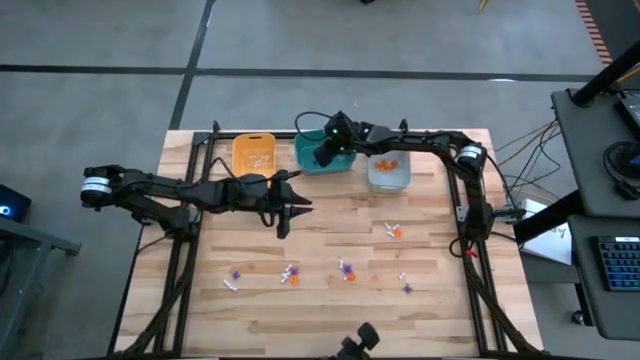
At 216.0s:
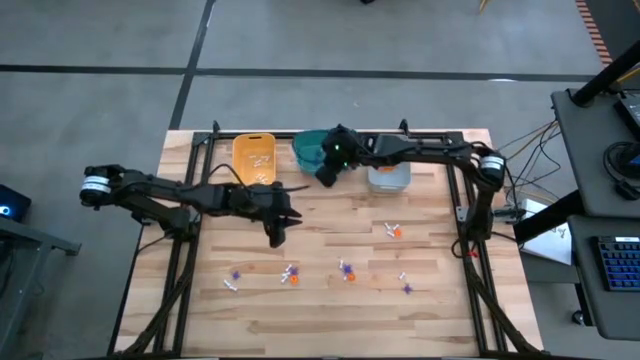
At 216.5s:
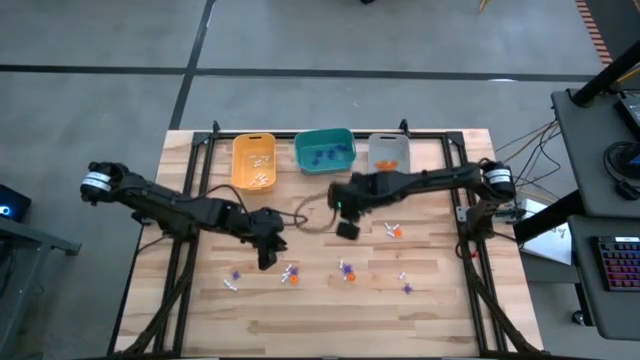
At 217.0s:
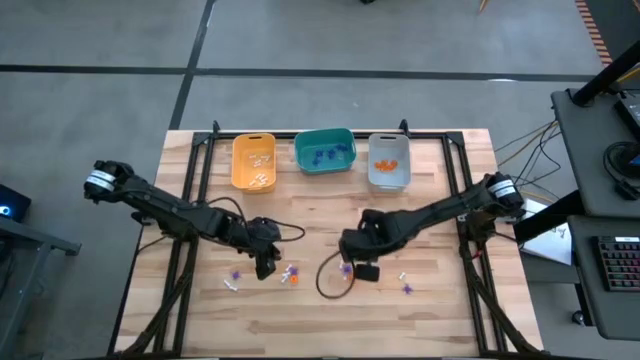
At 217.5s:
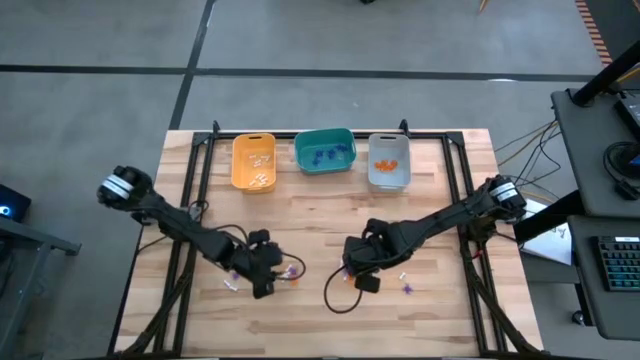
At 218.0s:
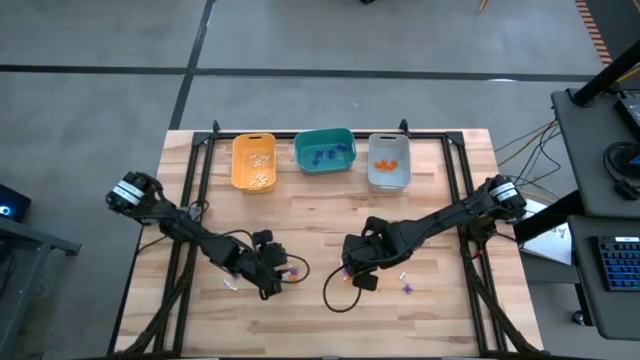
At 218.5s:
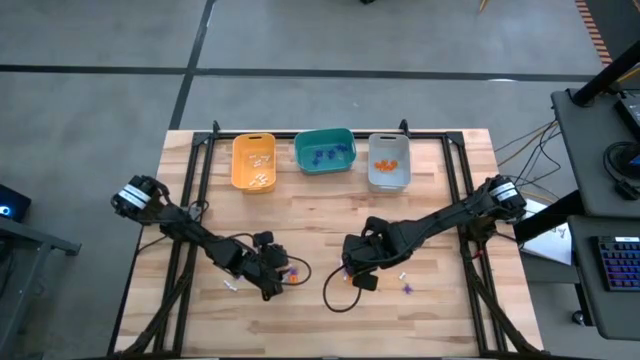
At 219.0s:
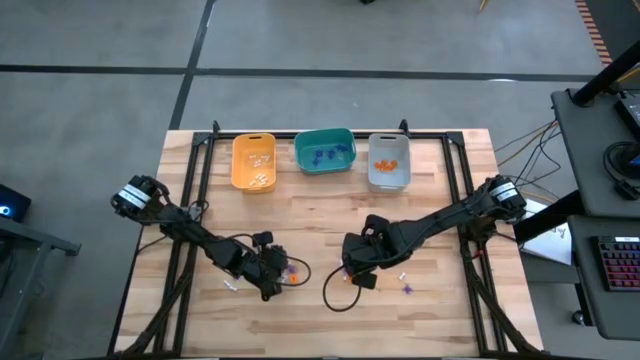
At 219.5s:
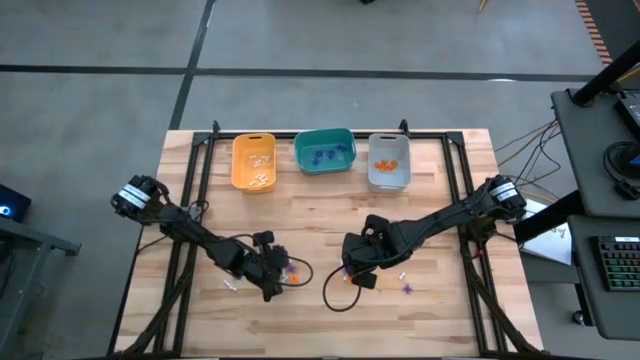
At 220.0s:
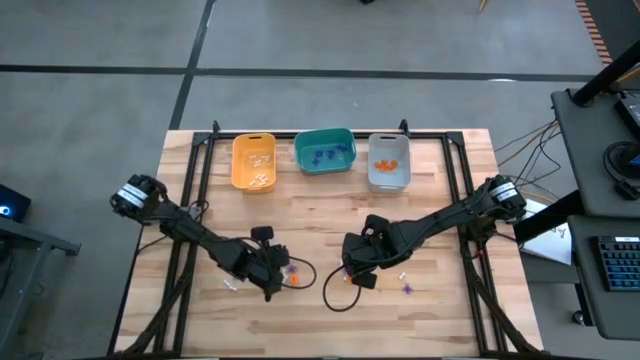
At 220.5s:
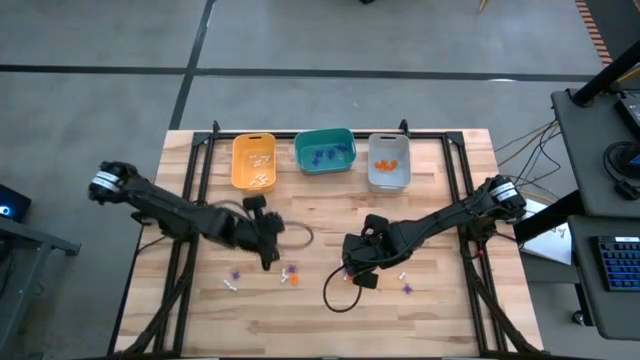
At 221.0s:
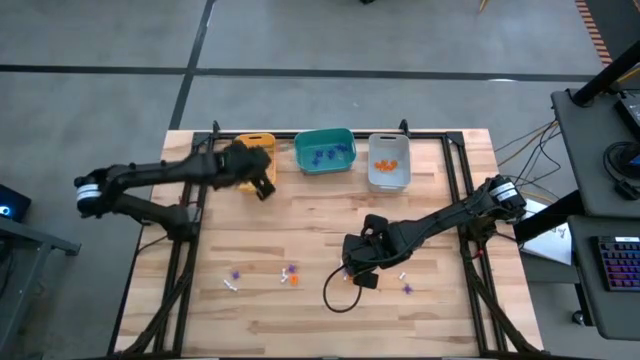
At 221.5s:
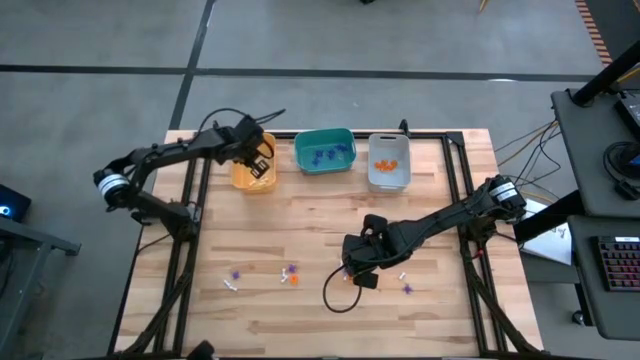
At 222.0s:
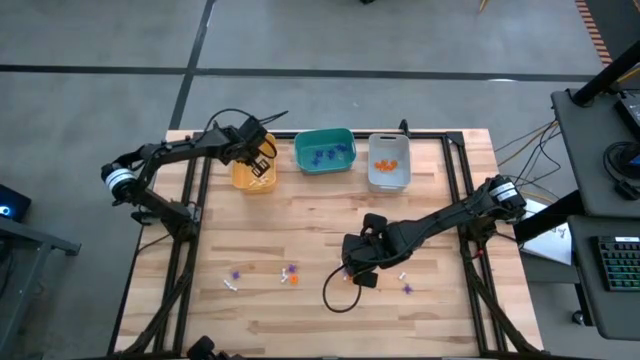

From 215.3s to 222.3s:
Task: Sort Halloween decoration
Put the white bone toy into the yellow bin

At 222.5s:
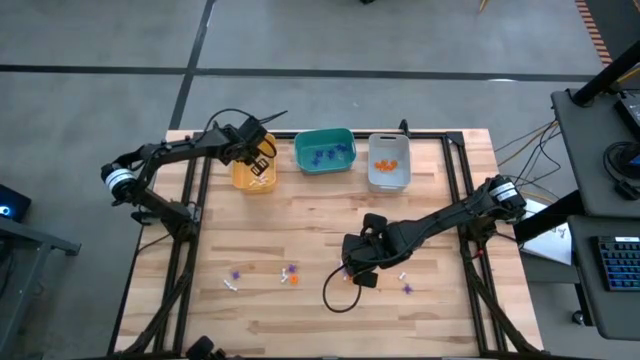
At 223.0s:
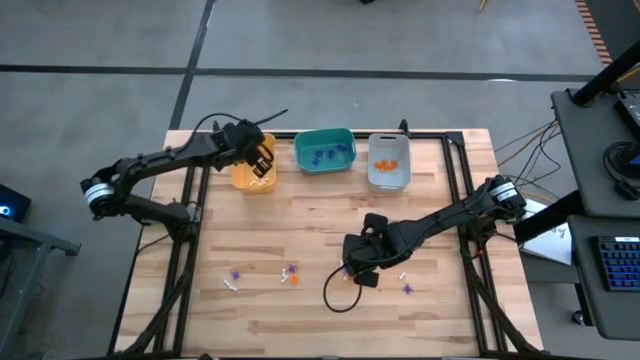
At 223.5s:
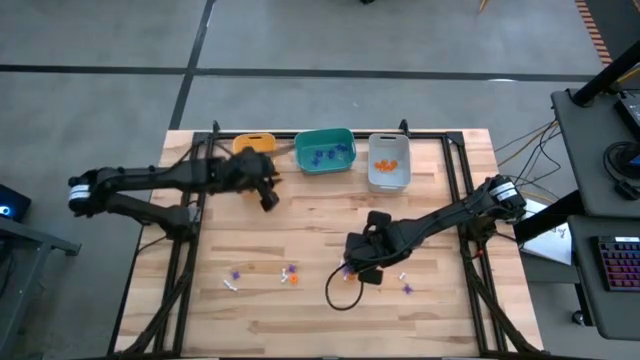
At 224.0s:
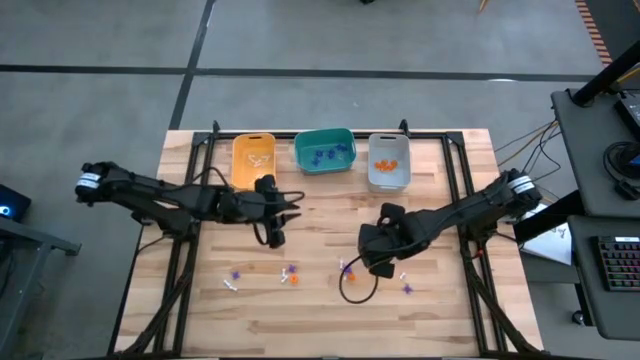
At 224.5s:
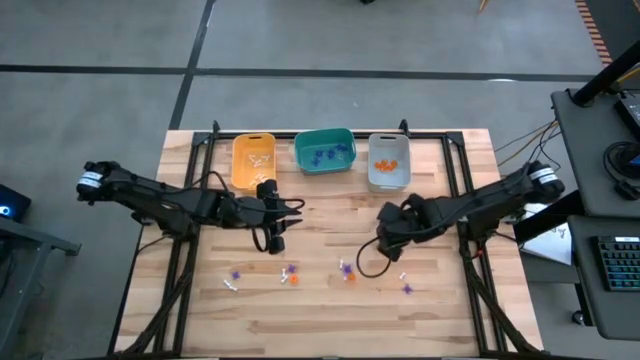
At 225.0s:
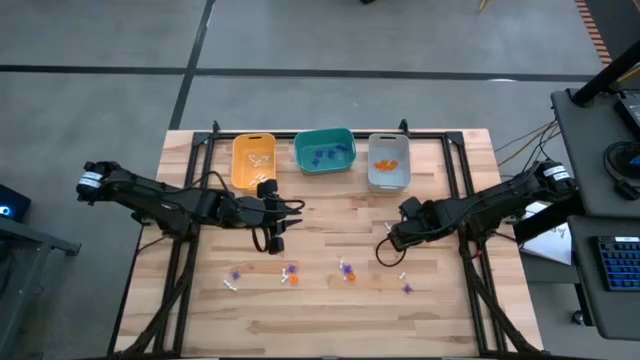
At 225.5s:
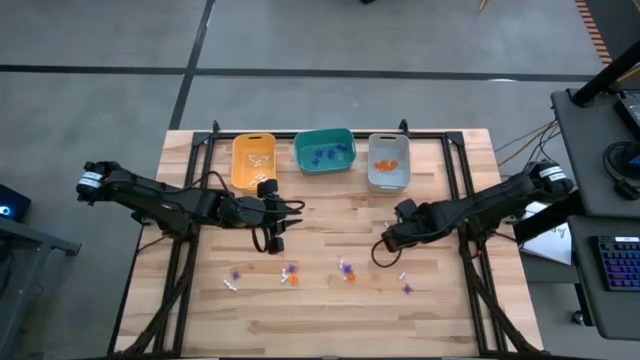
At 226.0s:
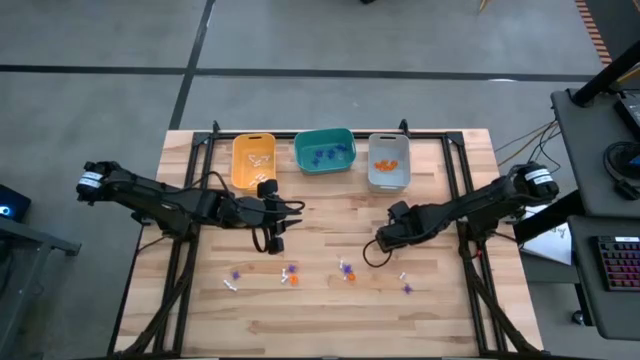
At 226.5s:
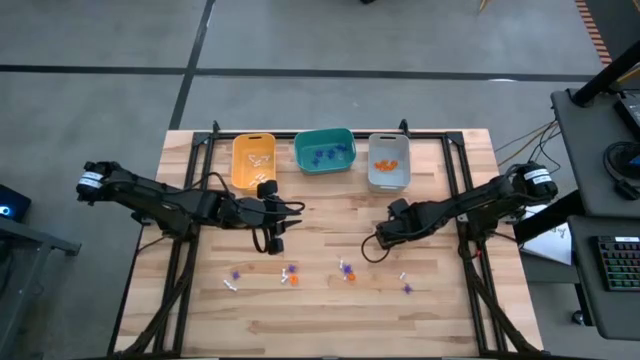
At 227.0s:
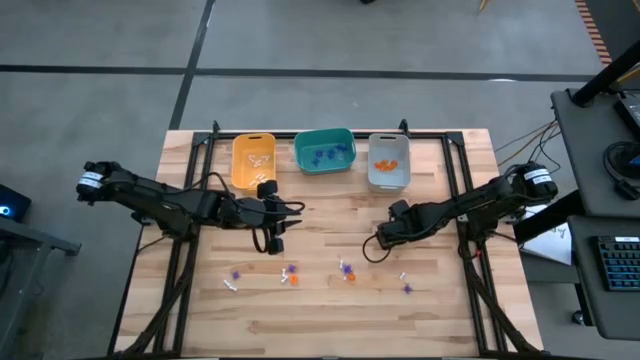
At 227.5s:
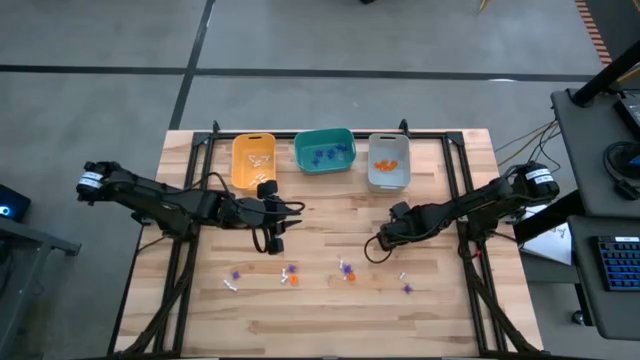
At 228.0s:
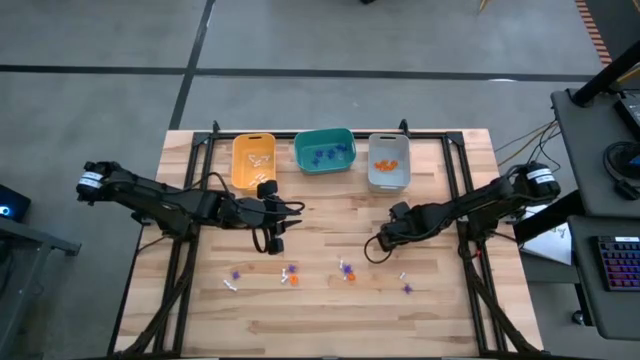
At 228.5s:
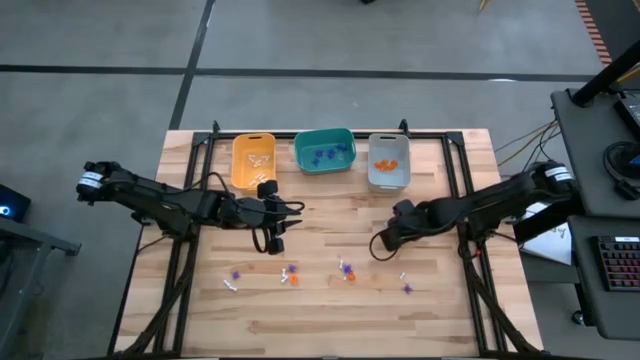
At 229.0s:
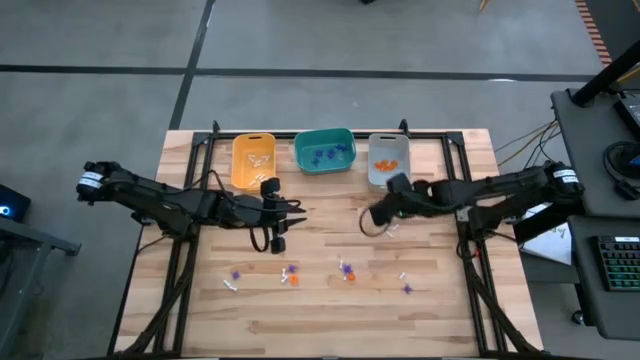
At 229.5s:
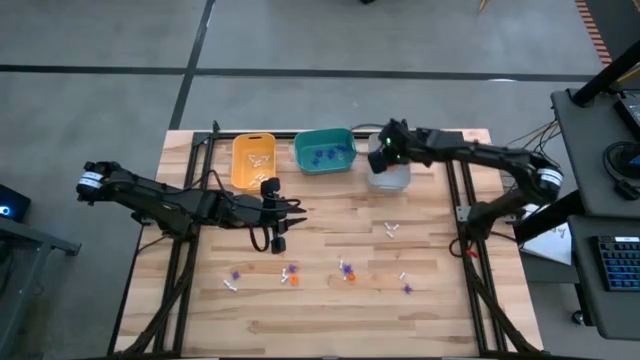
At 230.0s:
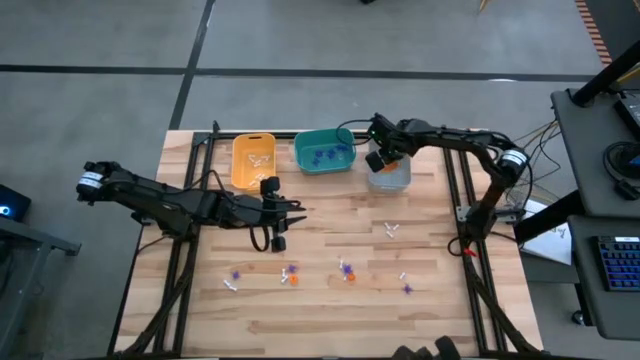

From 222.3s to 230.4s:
Put the orange pumpkin toy into the gray bin

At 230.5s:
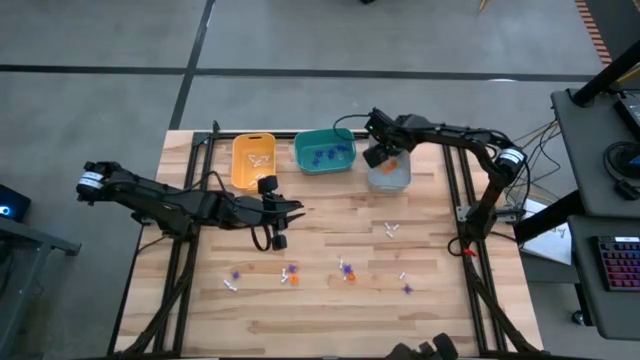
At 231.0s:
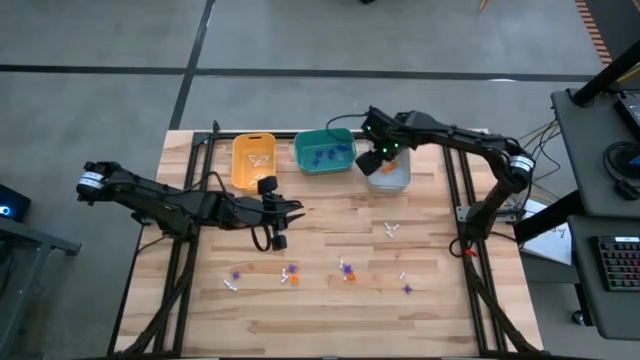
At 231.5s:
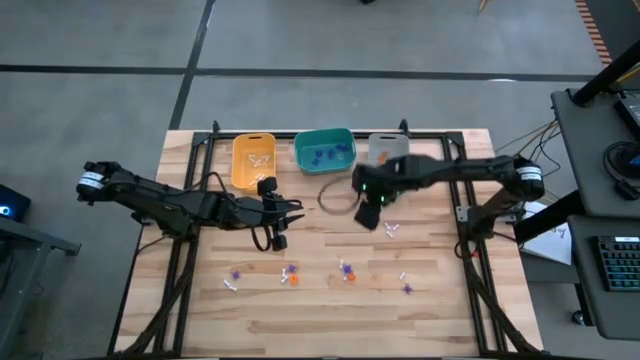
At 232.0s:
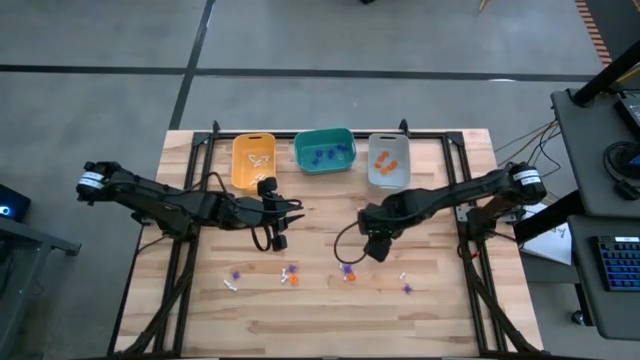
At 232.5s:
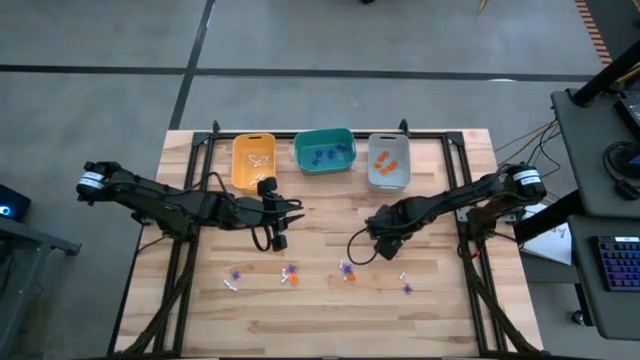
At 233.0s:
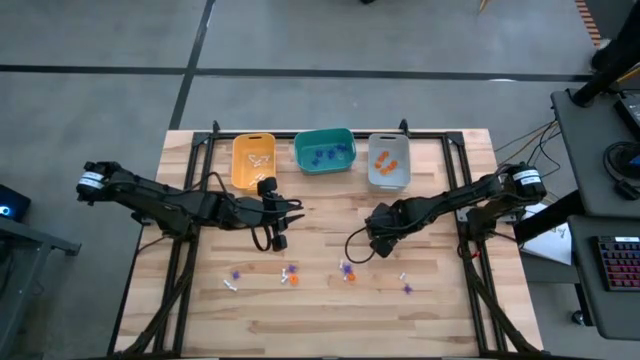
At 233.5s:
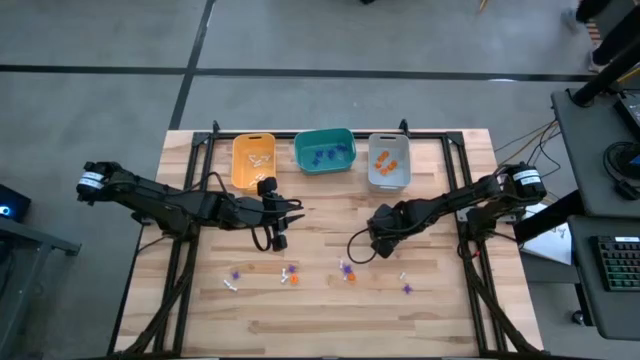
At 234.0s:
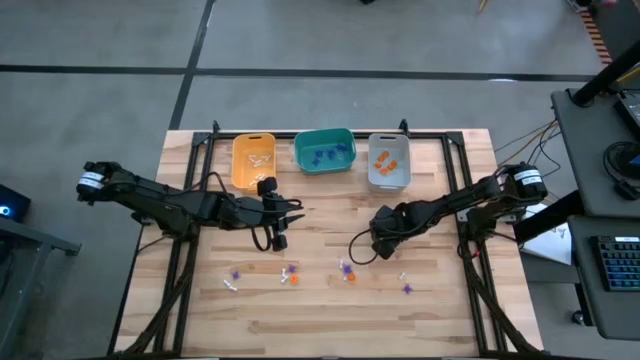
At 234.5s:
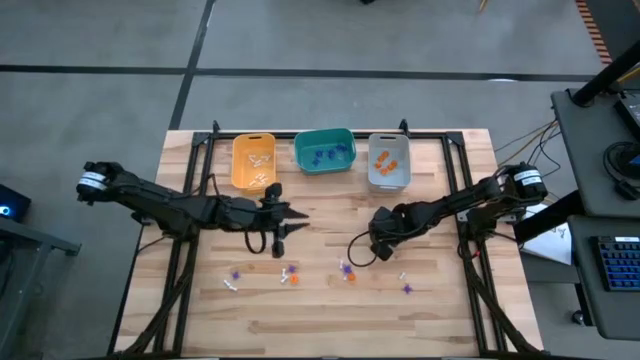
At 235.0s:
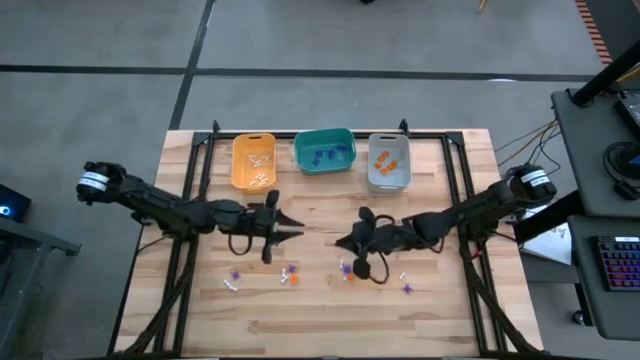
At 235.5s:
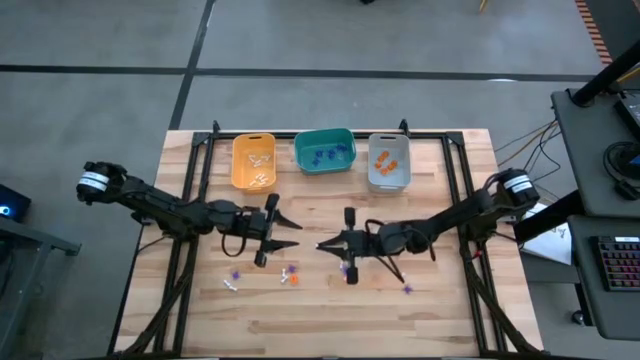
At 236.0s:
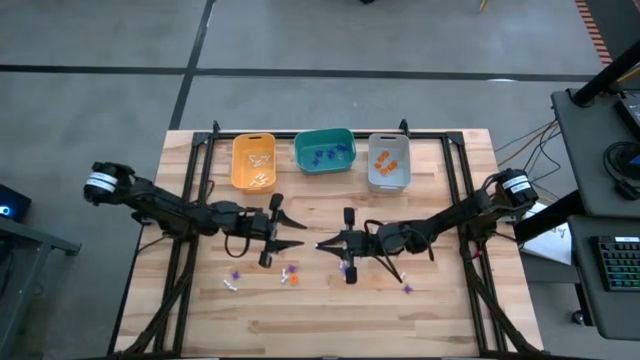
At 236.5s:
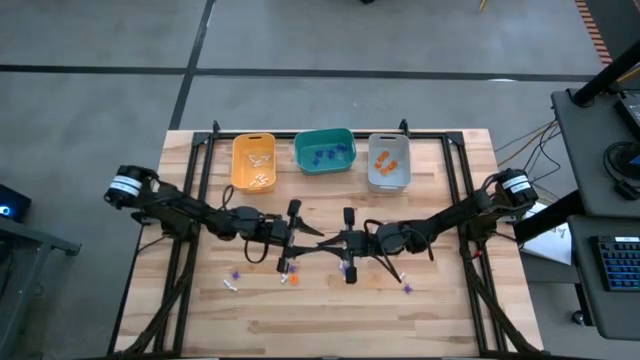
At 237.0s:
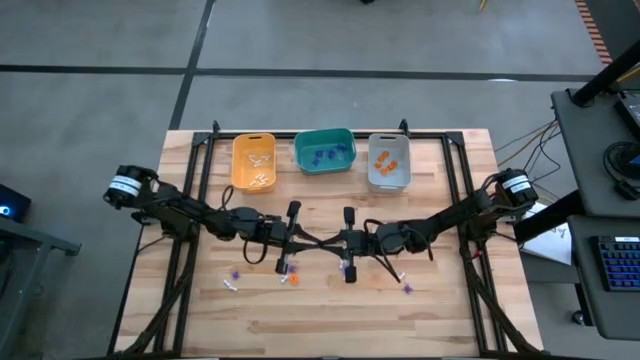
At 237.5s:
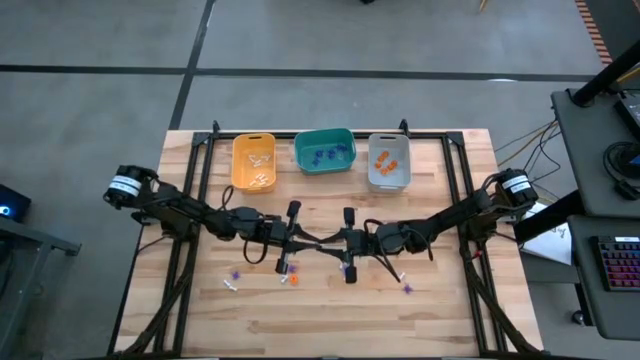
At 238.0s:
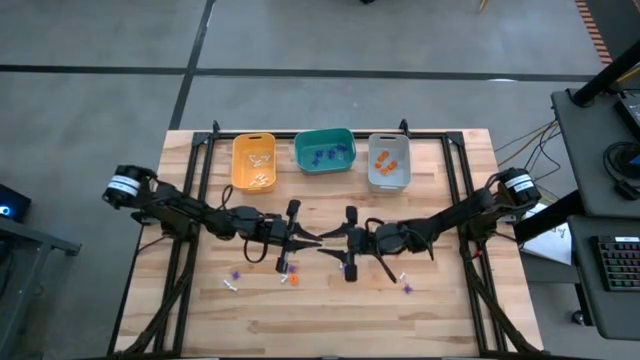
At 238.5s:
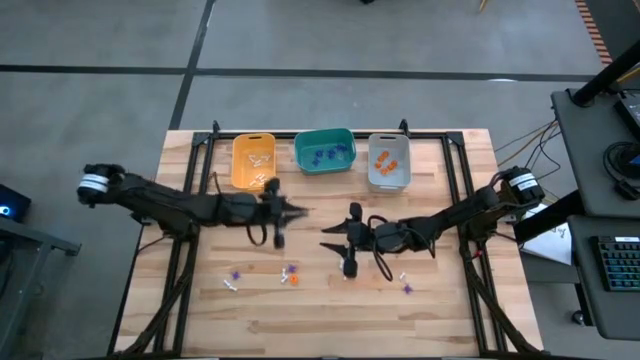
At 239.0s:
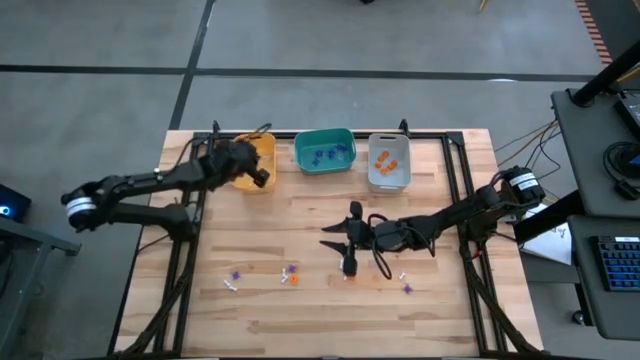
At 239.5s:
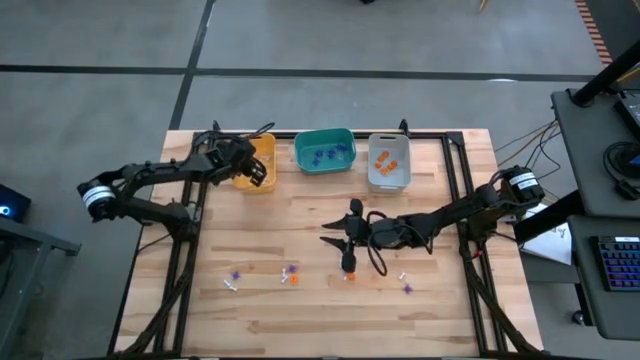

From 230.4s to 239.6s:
Put the white bone toy into the yellow bin
